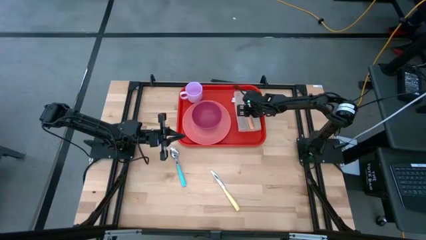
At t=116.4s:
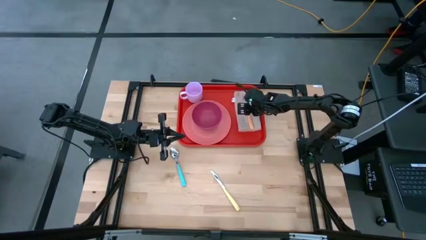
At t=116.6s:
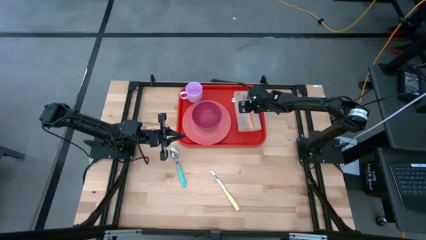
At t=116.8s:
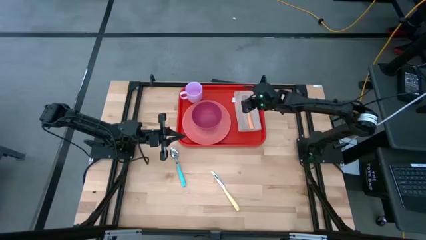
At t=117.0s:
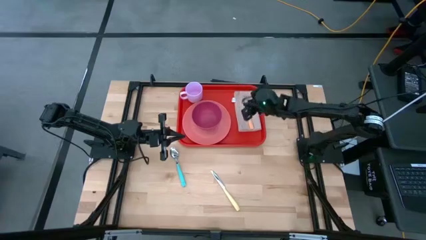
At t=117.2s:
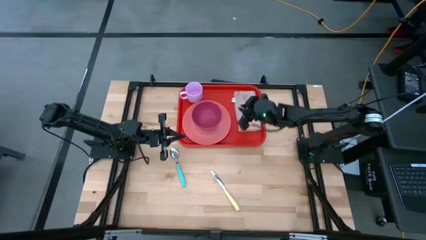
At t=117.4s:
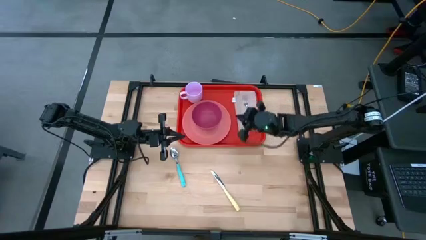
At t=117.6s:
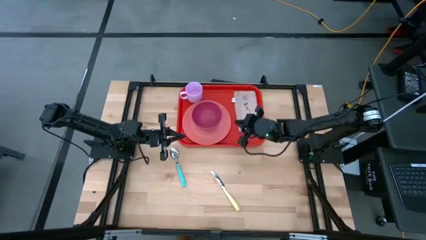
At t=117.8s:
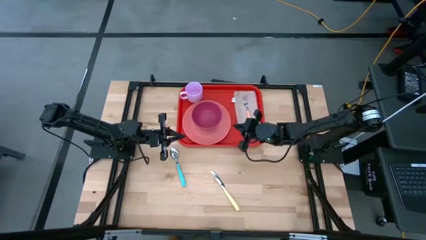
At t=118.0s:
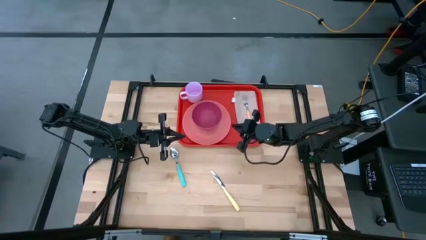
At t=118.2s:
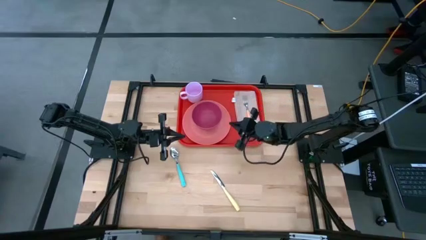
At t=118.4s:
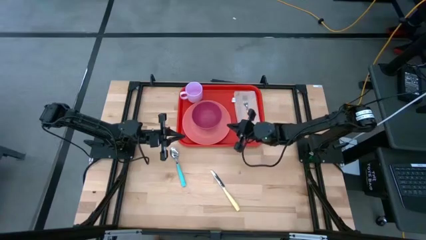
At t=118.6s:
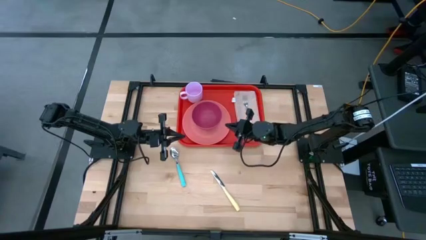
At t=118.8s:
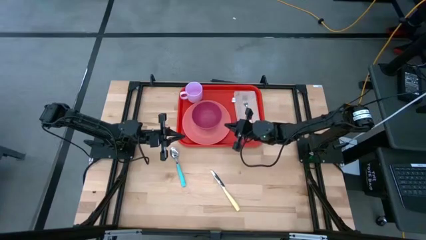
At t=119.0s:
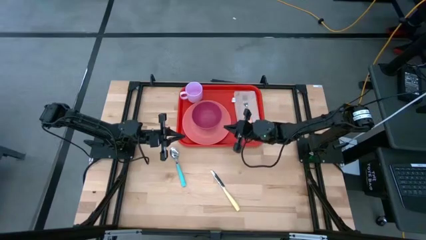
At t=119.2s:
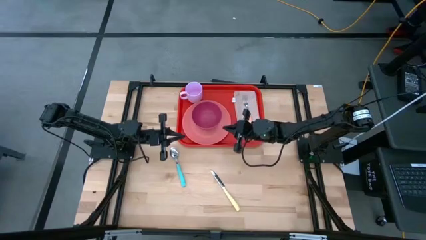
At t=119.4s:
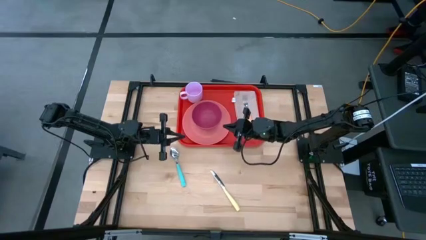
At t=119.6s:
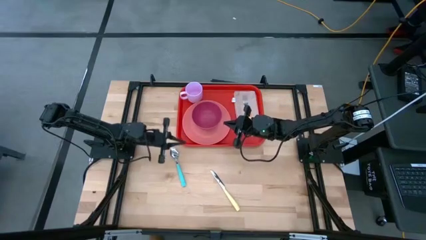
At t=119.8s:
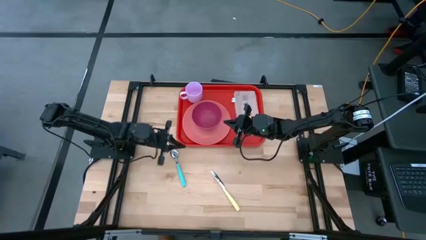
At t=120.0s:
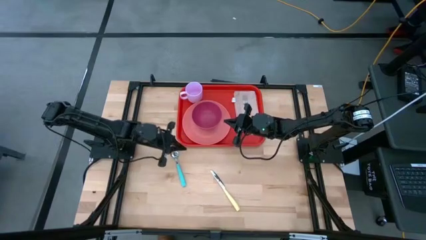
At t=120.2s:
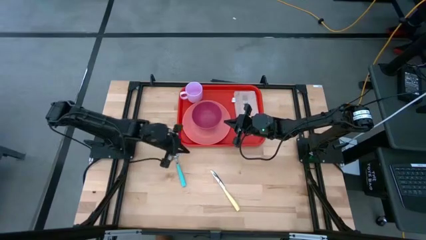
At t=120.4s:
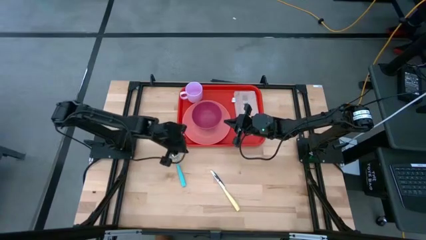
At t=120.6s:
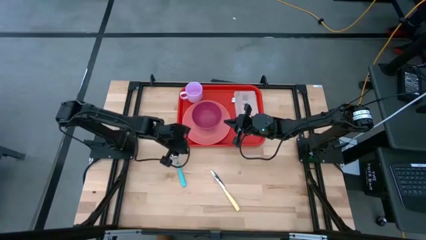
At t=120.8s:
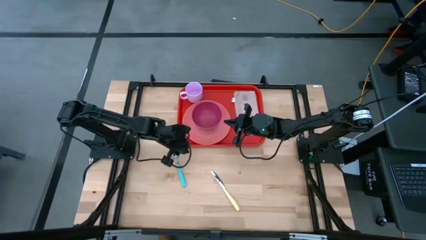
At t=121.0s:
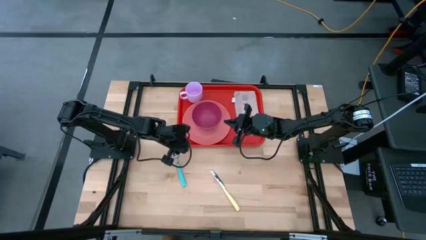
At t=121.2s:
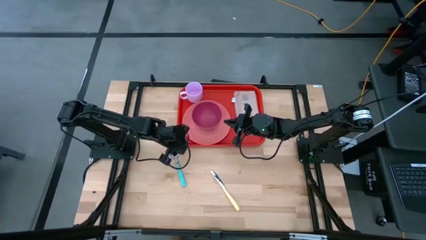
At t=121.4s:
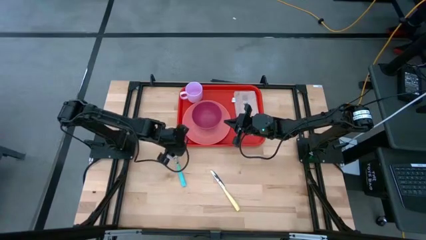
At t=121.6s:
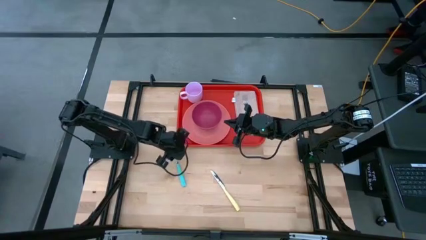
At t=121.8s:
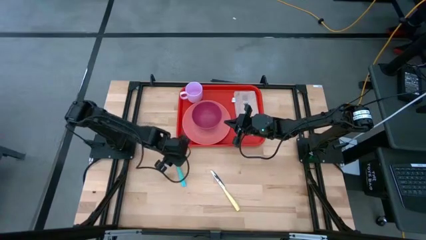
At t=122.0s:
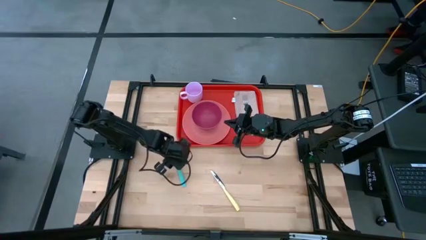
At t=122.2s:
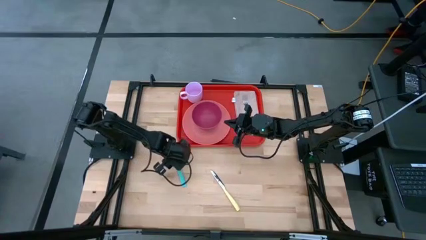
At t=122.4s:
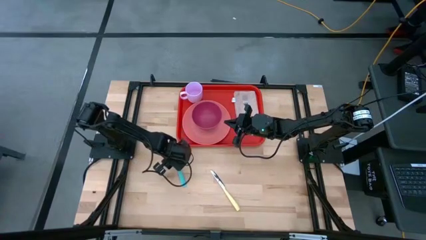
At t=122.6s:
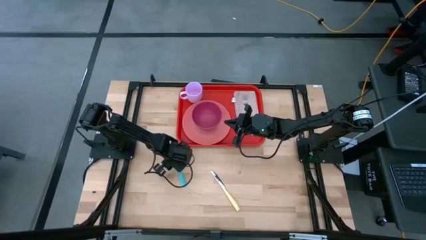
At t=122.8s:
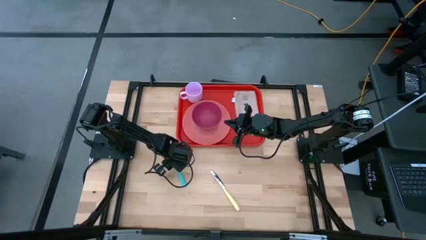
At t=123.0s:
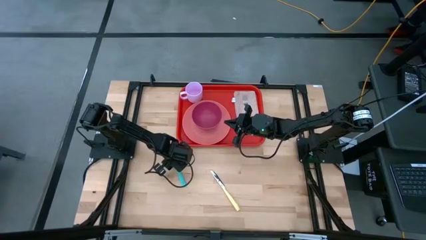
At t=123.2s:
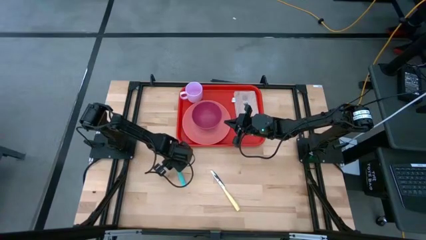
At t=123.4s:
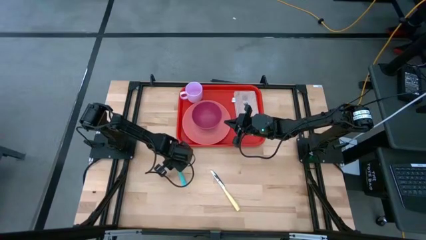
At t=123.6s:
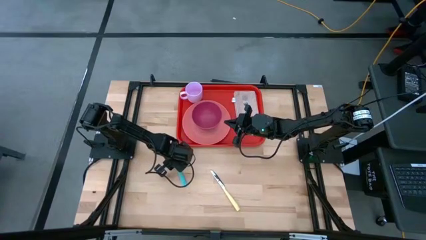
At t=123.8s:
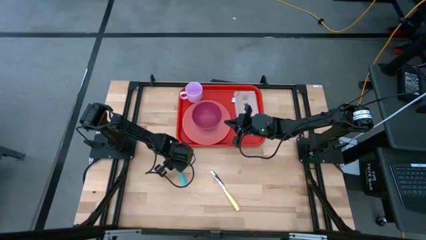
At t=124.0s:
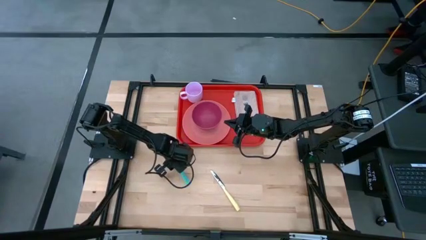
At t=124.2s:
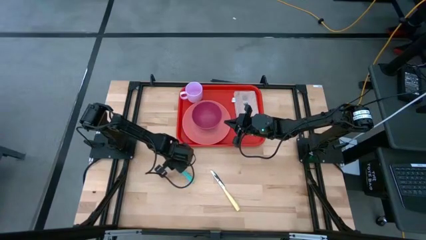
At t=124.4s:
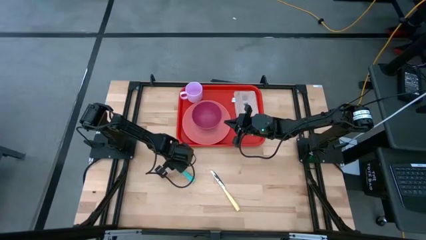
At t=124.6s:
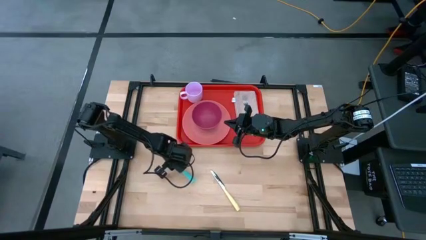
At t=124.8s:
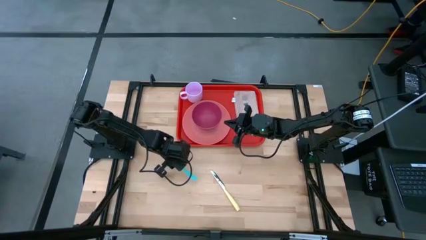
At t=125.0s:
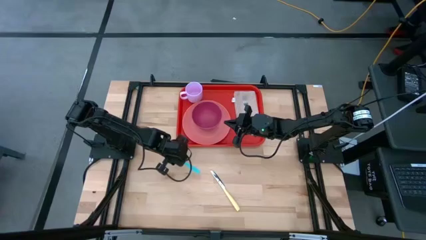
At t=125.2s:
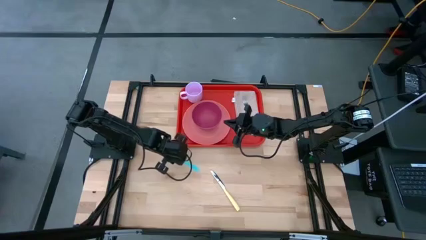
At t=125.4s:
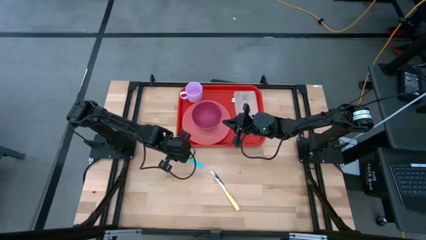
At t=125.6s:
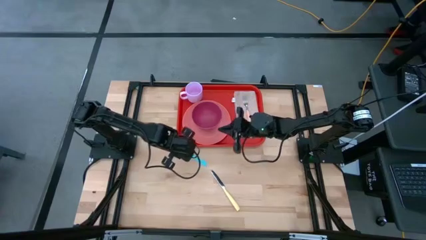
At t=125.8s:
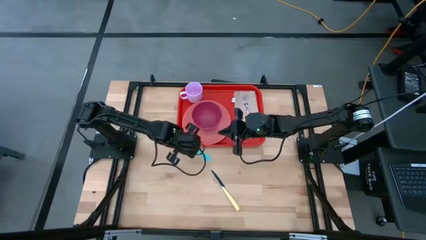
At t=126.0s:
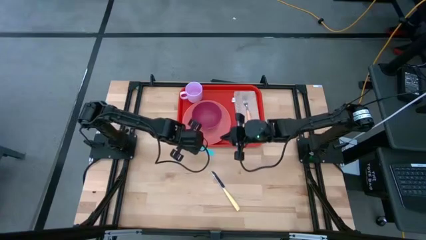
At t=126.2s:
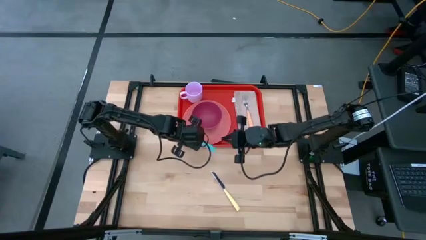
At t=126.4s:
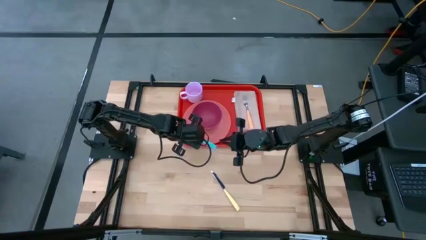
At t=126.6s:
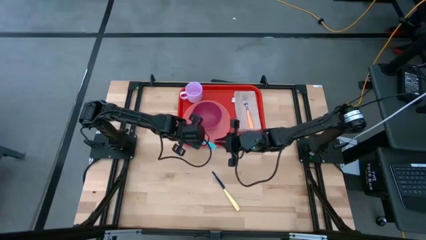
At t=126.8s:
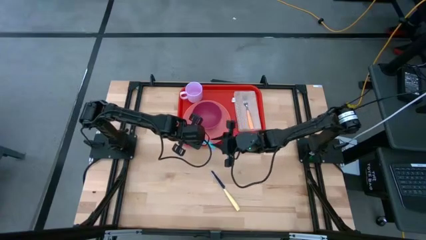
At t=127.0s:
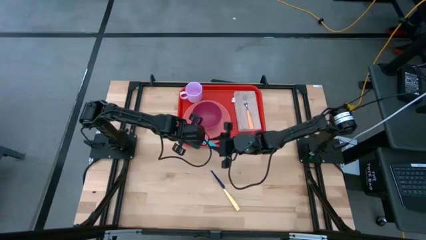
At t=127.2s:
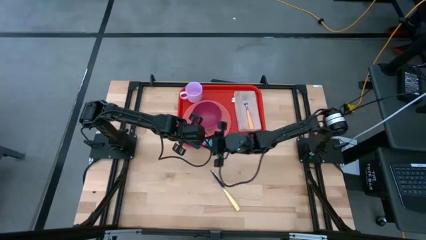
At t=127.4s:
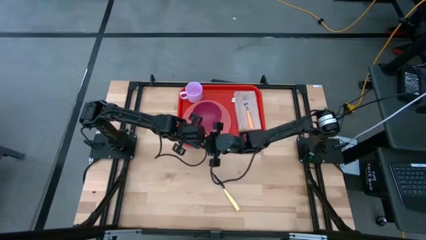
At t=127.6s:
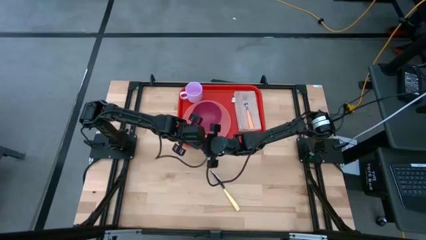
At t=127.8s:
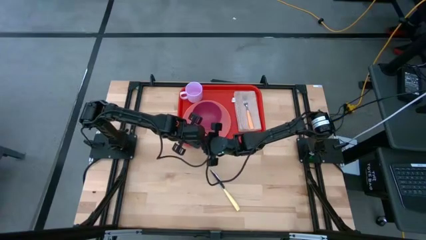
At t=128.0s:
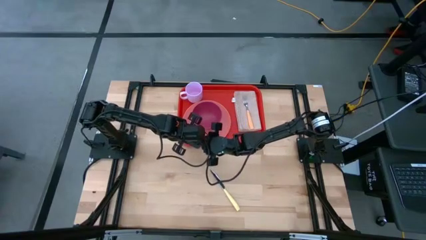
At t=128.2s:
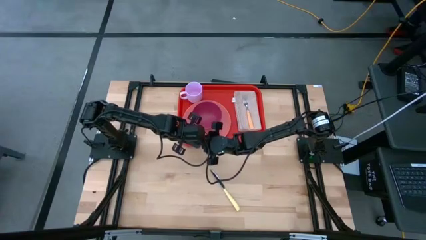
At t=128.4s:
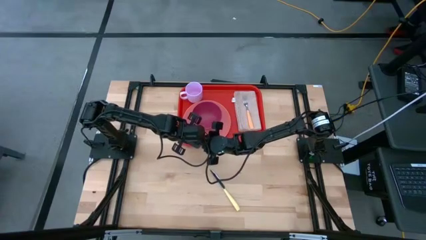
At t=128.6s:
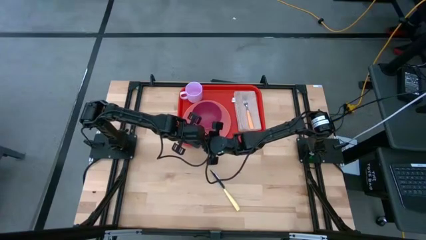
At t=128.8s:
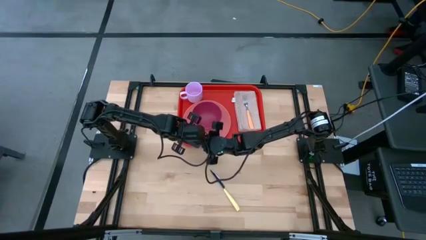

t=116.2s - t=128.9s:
Task: Set up tray
Put the blue spoon to the left side of the orange fork on the light brown table napkin on the red tray
